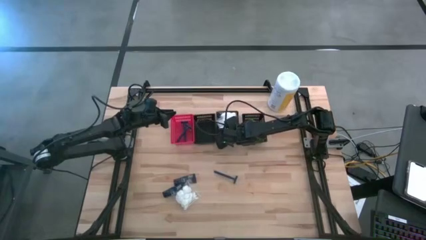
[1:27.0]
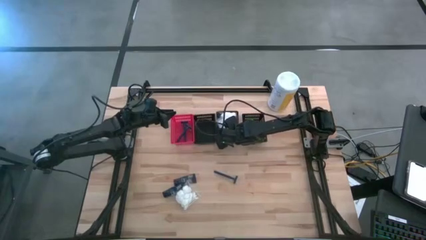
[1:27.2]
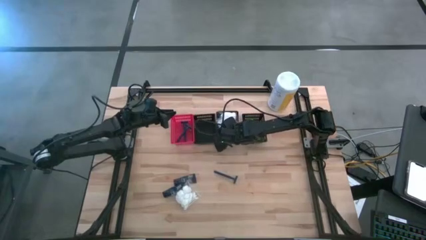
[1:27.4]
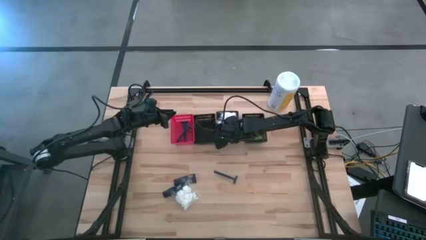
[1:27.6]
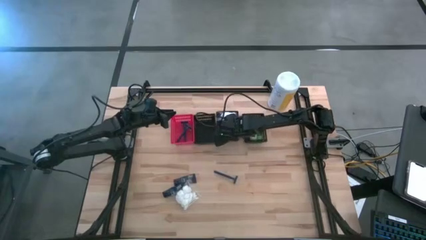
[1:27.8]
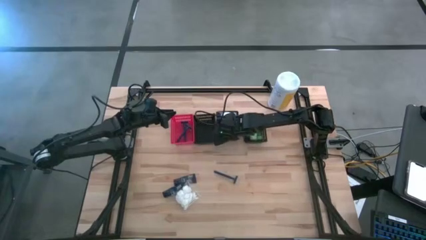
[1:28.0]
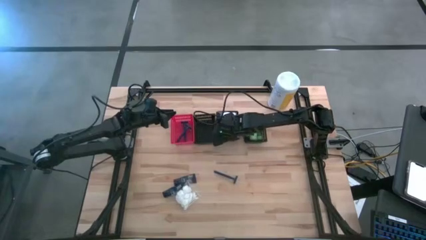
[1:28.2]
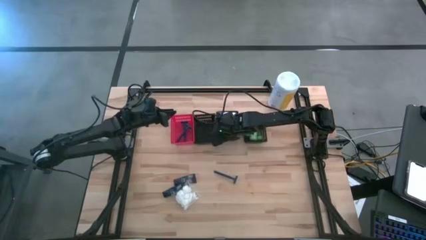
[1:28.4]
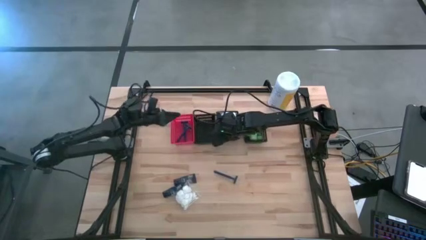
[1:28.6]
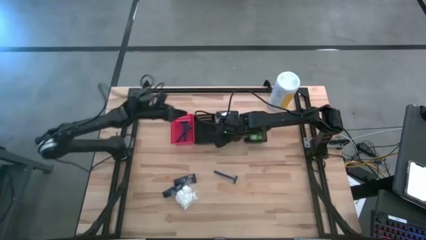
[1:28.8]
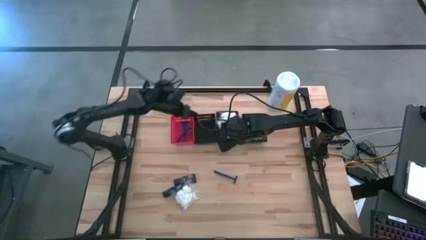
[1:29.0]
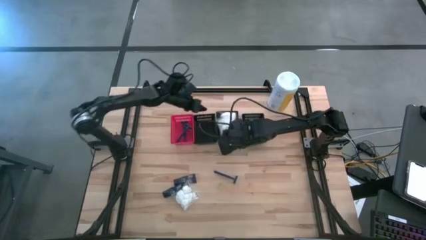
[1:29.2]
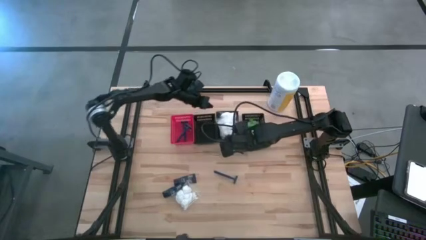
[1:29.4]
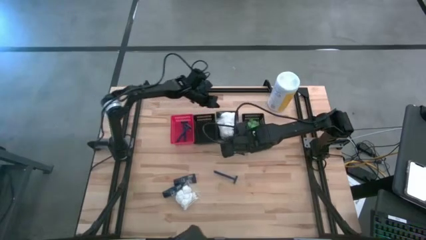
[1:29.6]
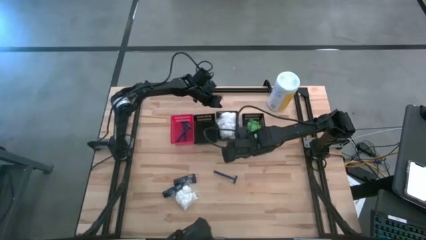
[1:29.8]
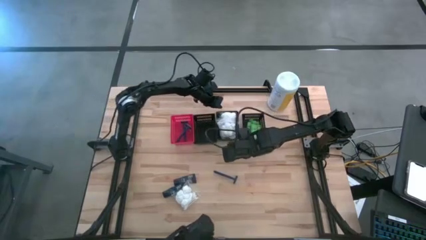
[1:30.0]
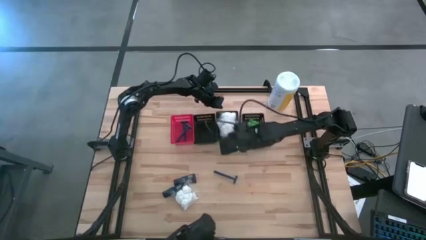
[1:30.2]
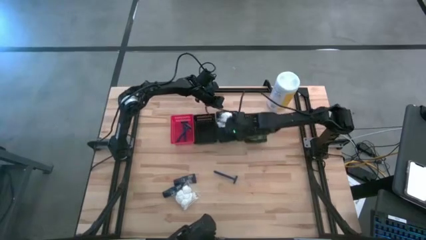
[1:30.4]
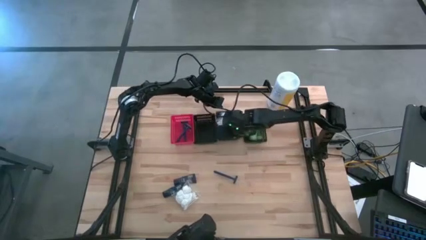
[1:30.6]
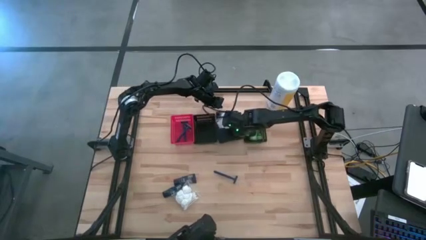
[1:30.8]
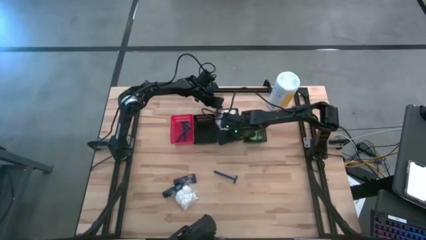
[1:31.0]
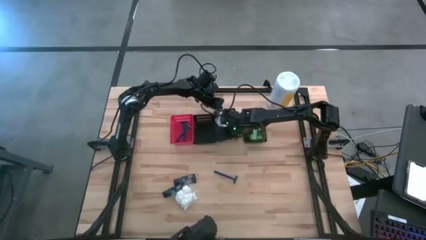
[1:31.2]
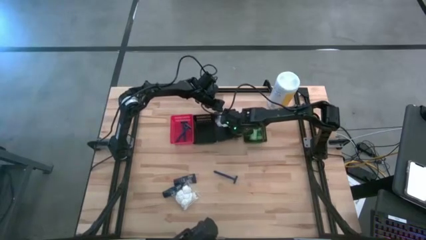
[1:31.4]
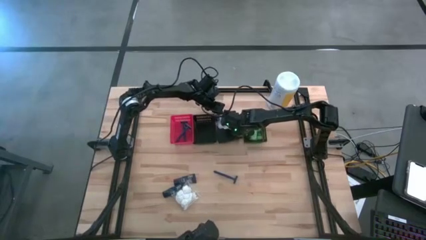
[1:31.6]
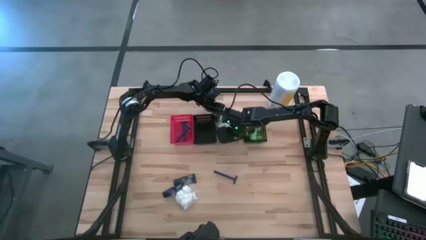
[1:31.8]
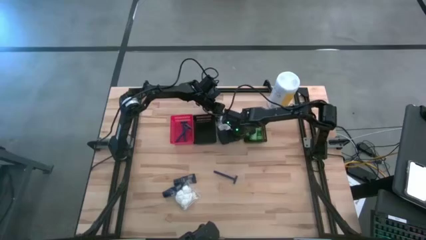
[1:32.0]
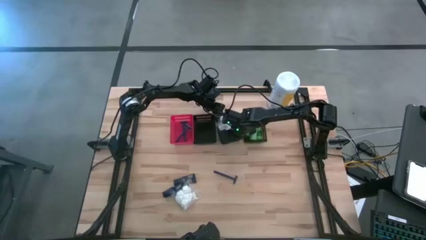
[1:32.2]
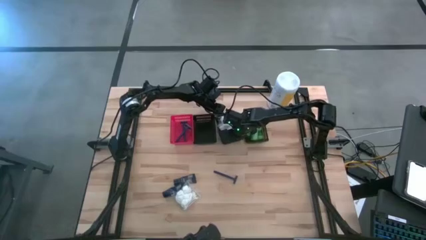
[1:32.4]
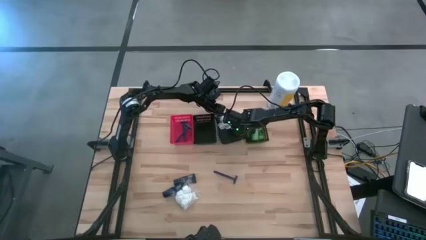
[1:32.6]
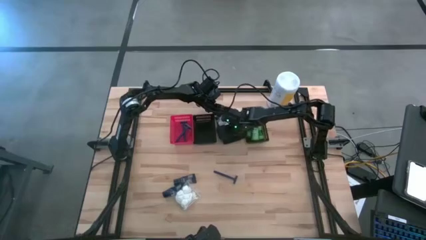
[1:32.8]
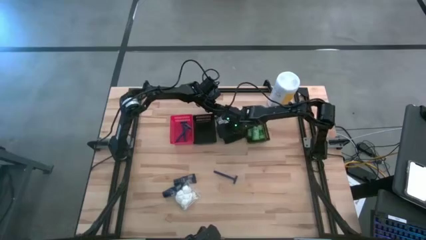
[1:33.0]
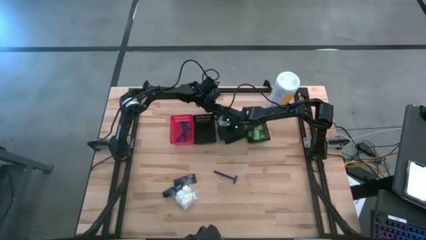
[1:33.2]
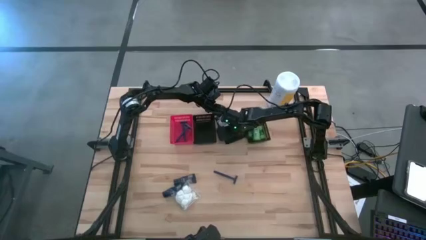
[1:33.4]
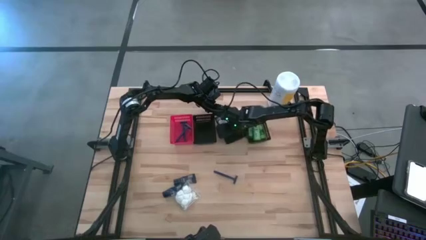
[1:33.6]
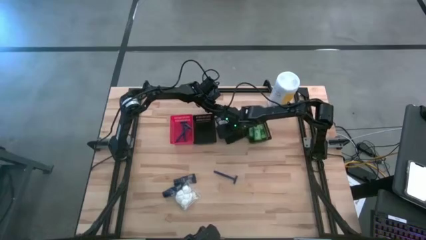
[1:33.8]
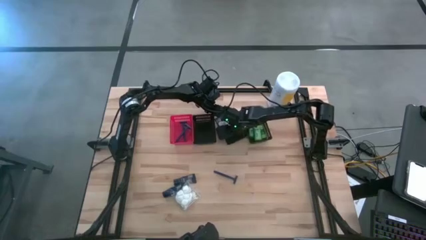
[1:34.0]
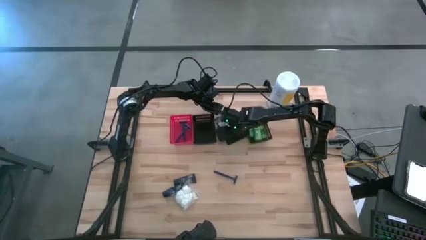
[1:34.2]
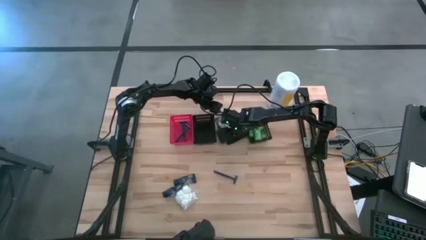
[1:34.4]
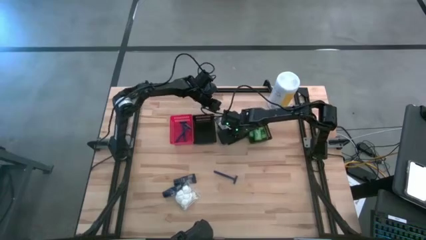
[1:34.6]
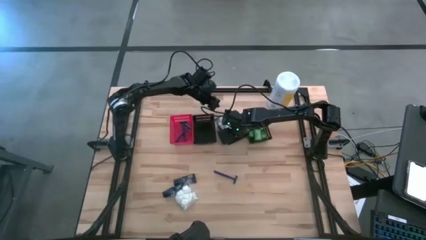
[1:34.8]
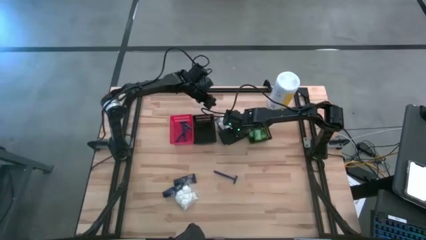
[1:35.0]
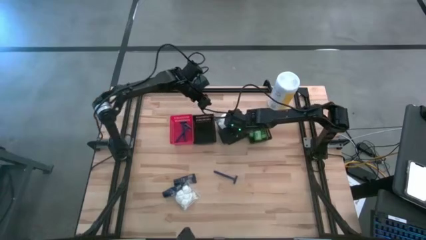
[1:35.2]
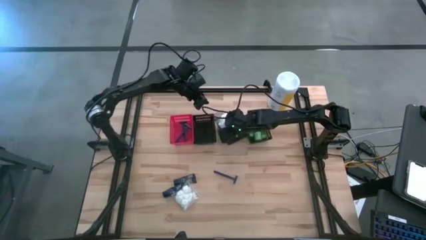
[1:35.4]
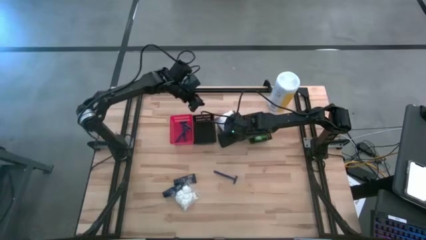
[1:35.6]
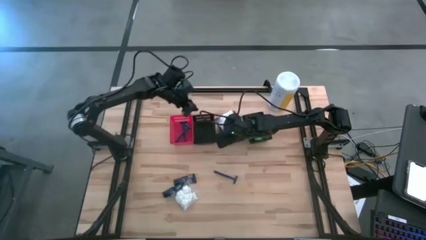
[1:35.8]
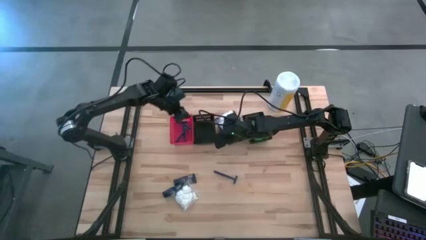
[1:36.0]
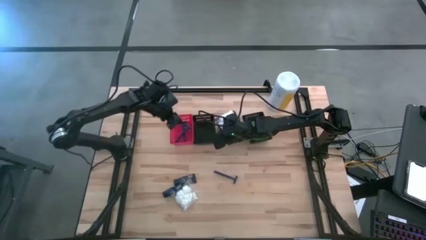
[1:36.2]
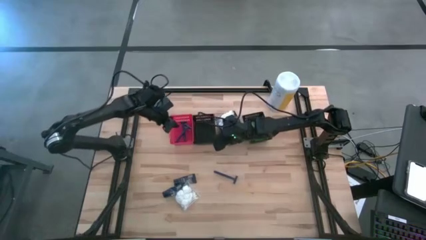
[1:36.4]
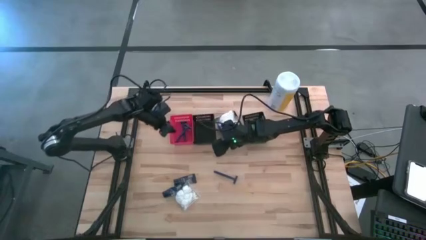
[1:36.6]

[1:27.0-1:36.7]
Task: Pick & Place Travel size toiletries
Put the cotton pack into the middle black bin

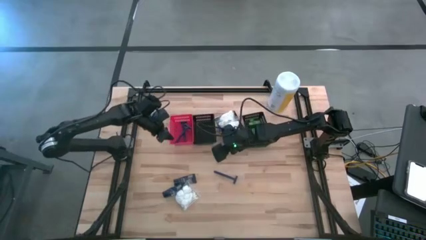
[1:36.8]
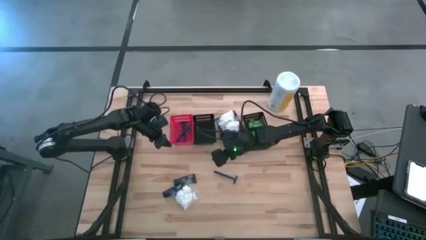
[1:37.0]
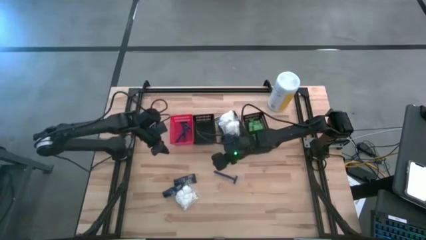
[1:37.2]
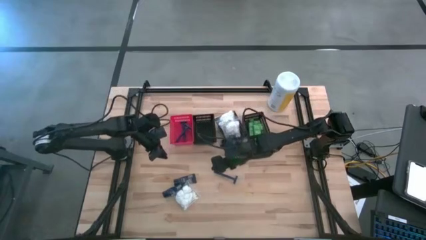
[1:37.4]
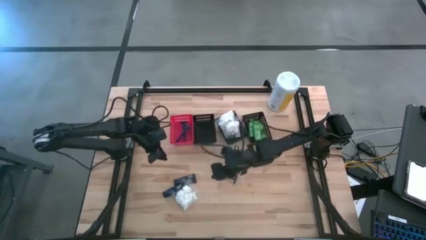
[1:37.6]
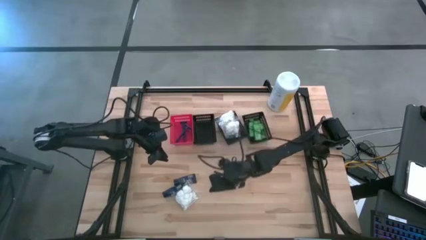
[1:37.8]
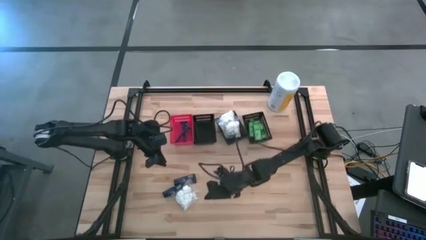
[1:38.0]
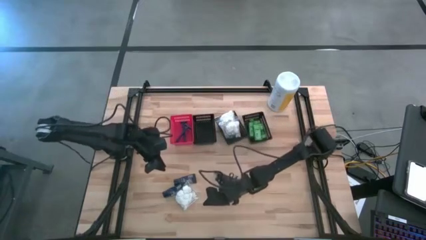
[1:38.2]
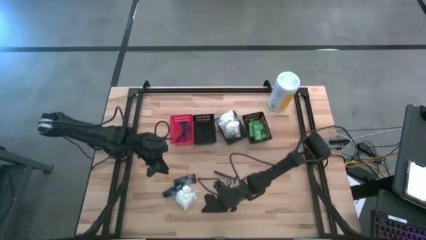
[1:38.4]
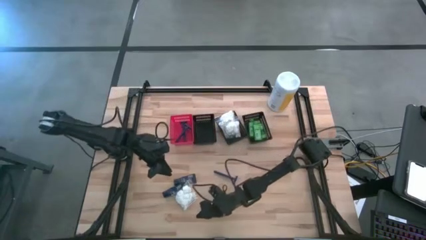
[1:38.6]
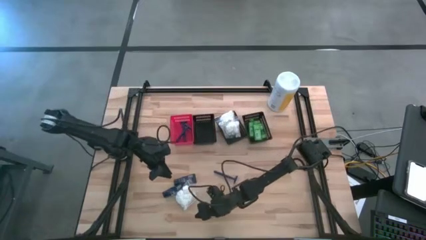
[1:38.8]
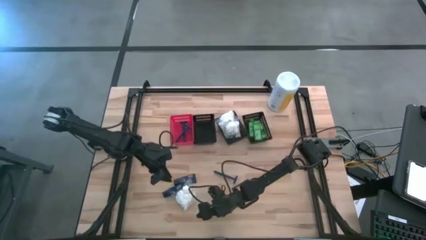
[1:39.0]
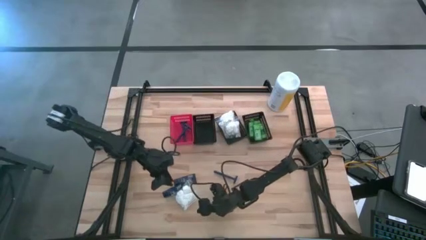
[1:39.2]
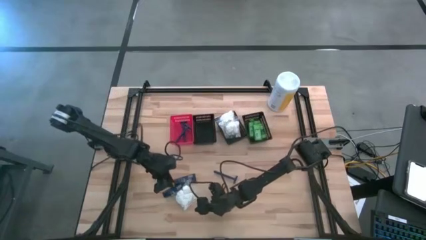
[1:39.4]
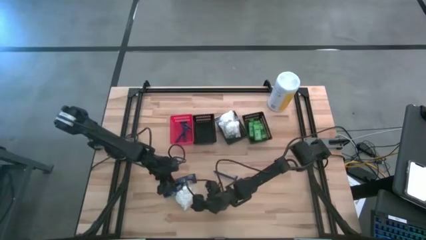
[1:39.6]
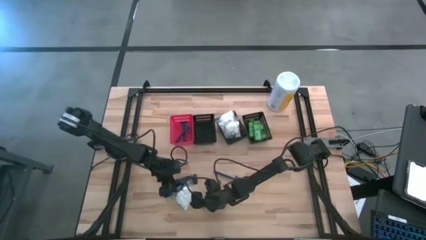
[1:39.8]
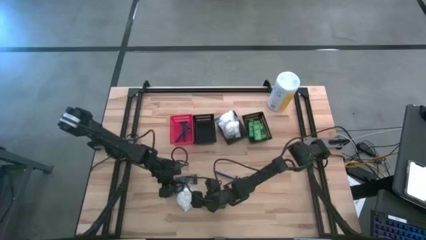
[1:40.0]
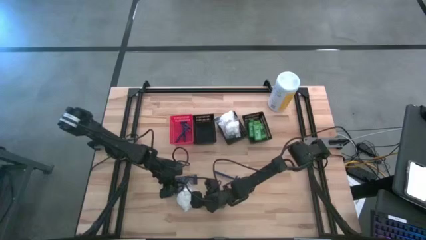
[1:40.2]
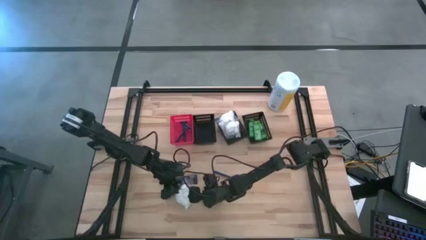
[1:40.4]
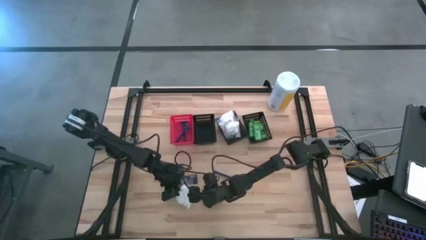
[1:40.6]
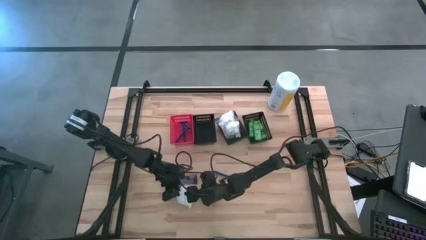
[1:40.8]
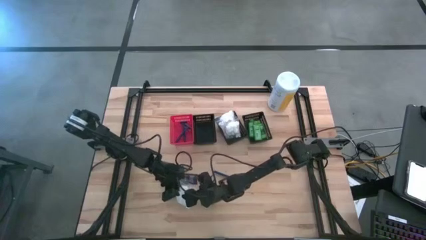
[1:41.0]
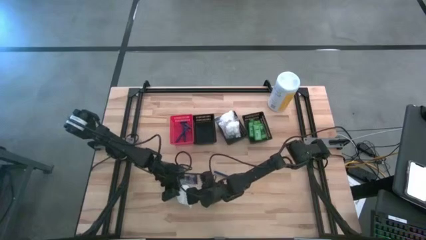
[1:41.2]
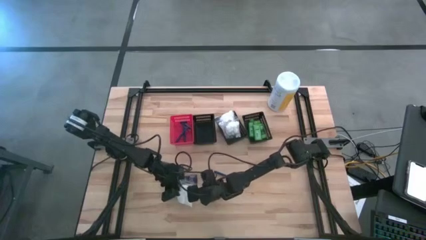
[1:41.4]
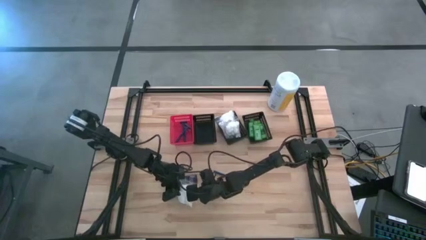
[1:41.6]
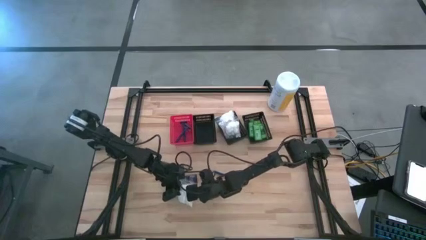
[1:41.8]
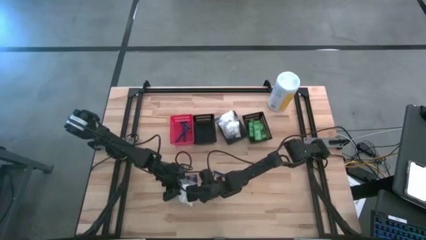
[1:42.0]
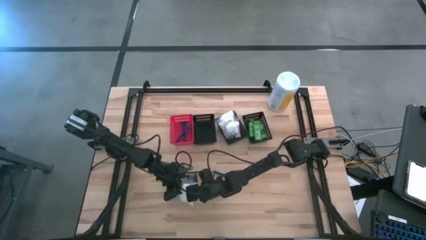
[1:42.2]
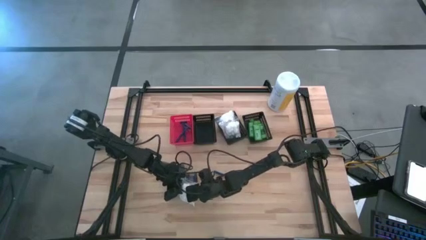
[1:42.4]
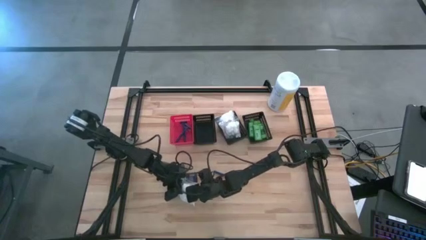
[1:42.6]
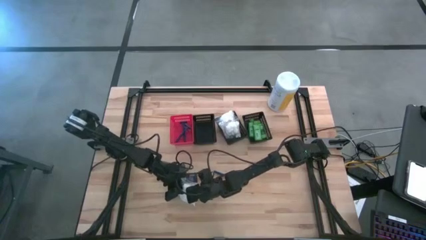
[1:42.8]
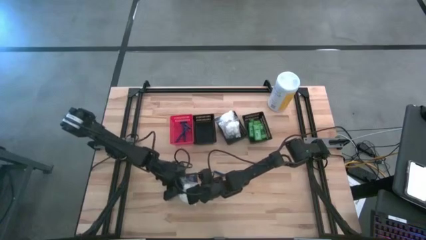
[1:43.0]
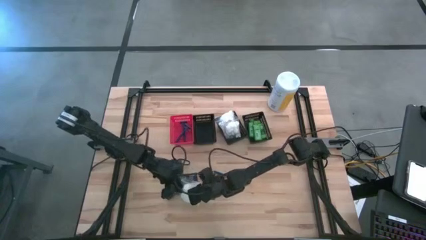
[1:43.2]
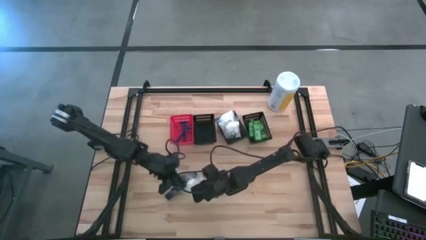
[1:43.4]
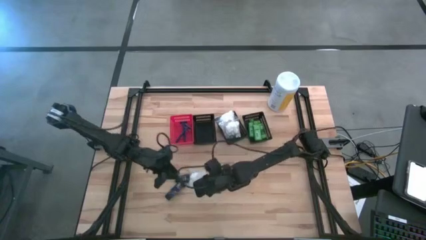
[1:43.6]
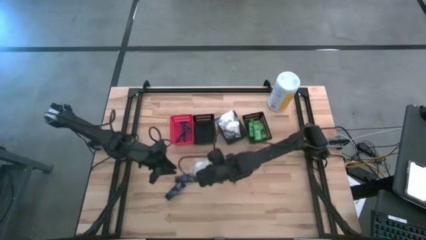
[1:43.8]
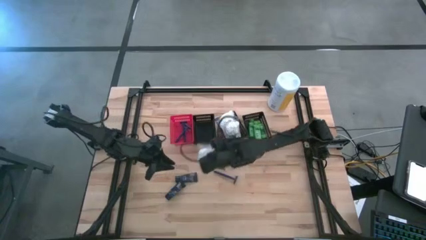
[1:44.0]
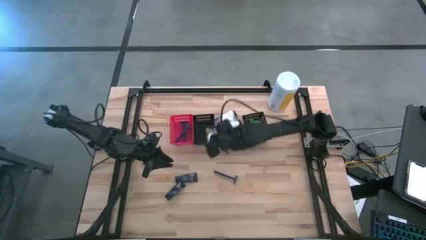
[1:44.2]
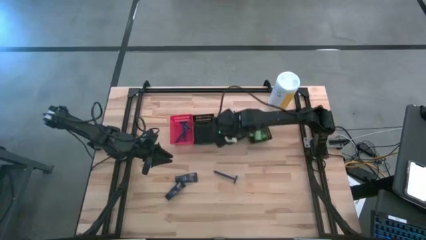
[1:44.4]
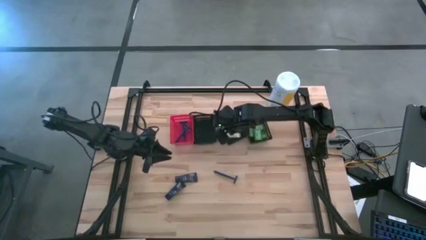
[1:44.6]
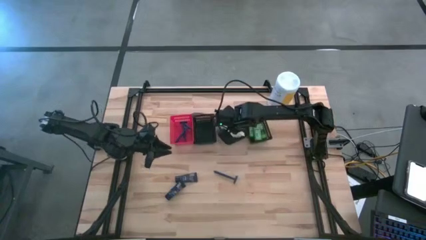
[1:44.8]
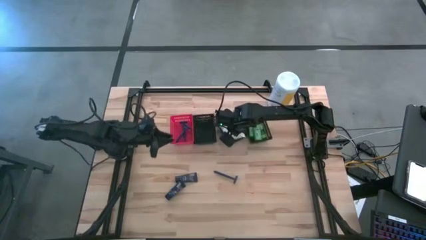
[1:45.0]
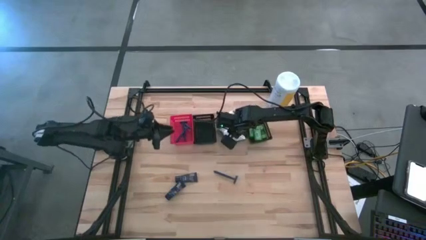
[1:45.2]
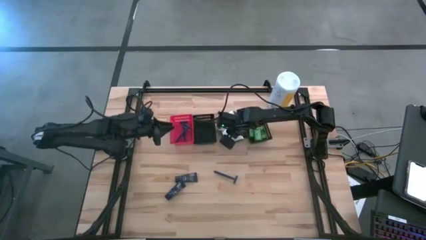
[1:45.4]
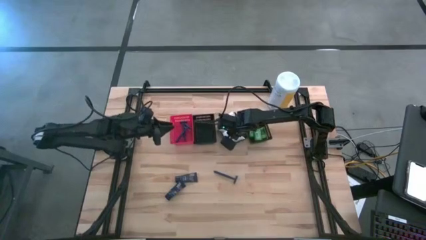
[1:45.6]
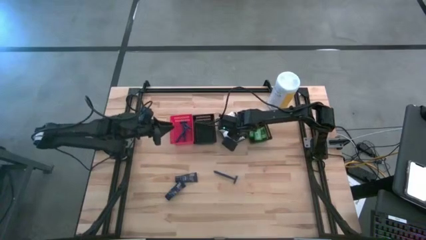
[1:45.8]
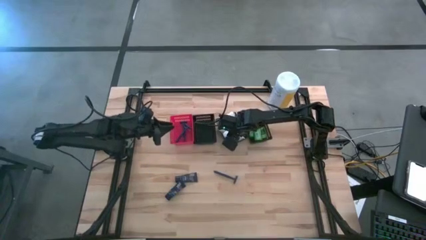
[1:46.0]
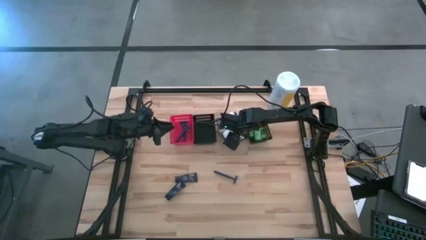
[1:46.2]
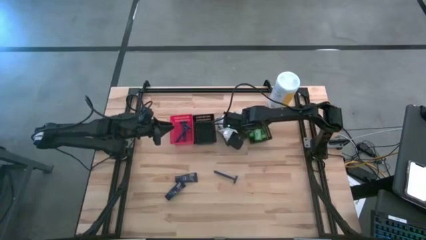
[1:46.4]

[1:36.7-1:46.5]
Put the cotton pack into the middle black bin
